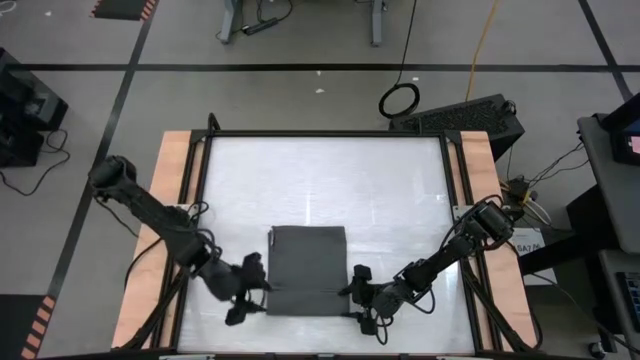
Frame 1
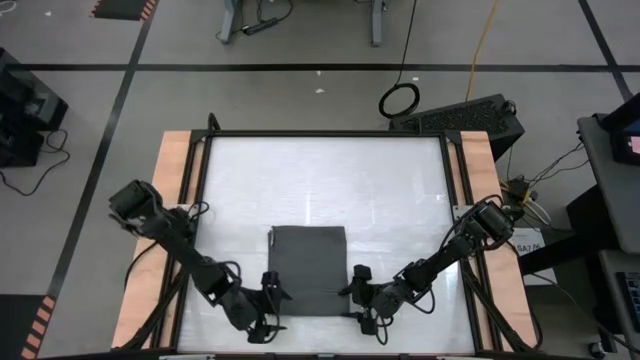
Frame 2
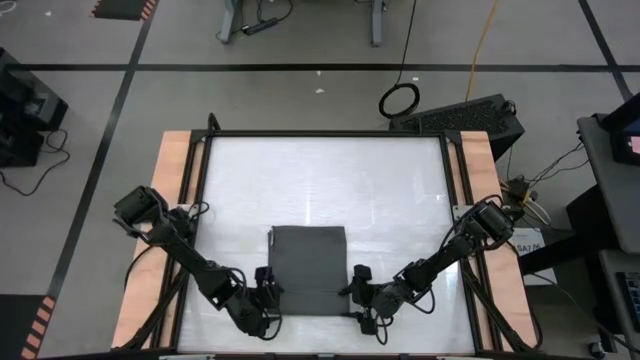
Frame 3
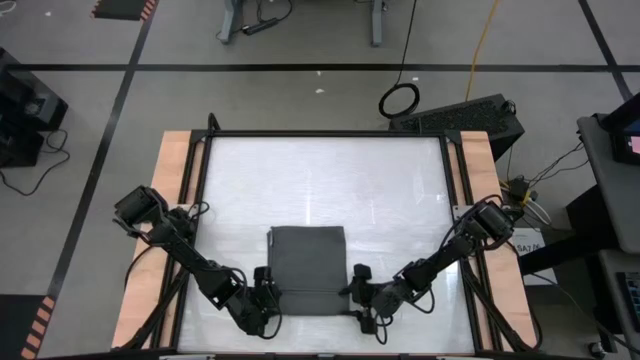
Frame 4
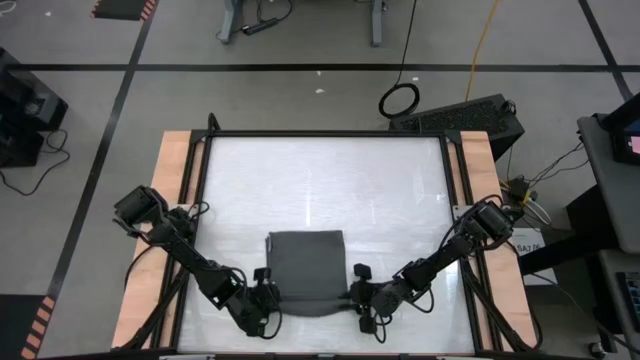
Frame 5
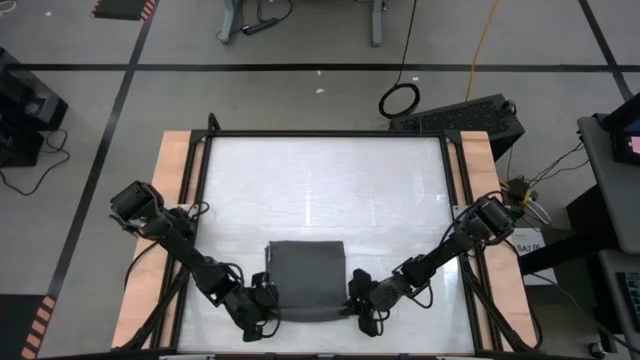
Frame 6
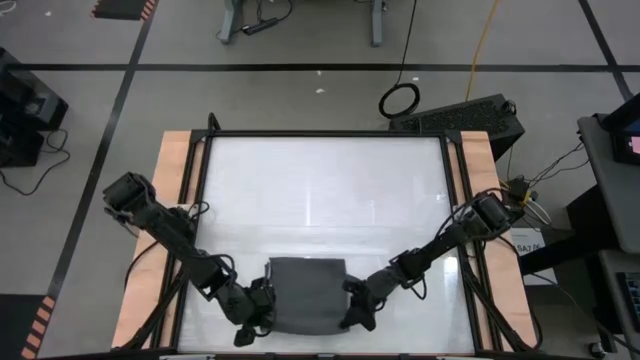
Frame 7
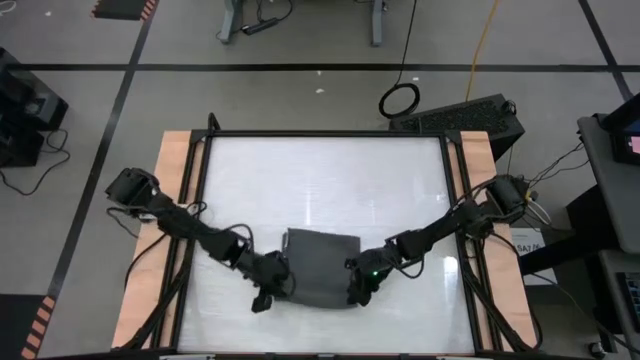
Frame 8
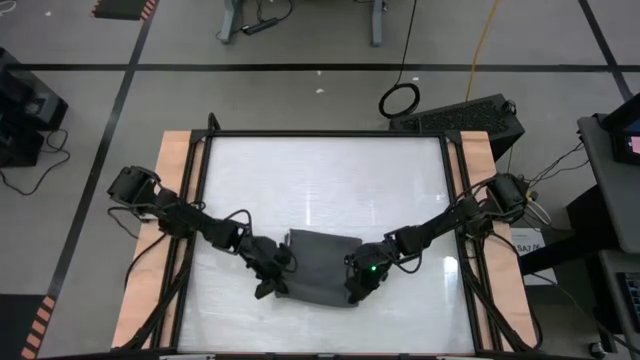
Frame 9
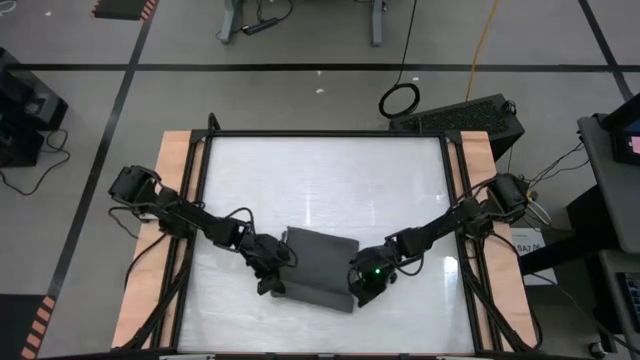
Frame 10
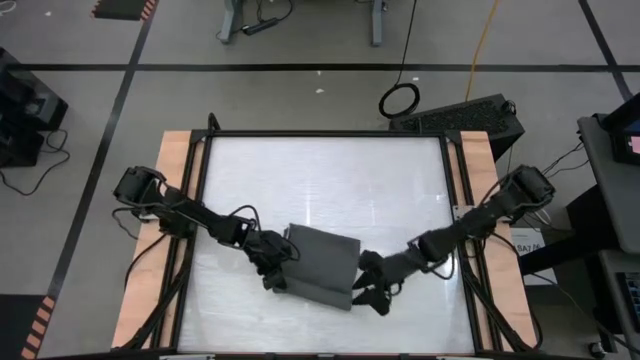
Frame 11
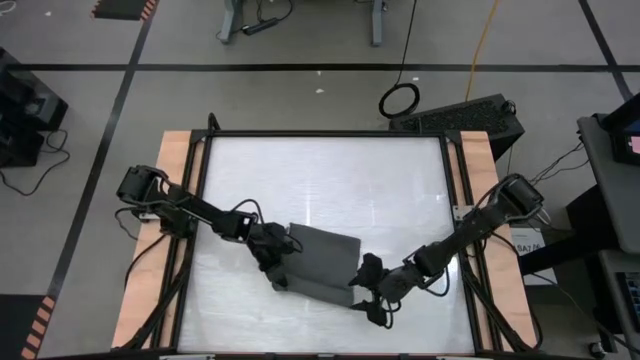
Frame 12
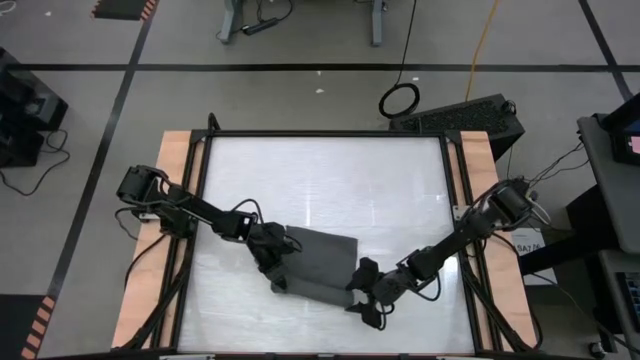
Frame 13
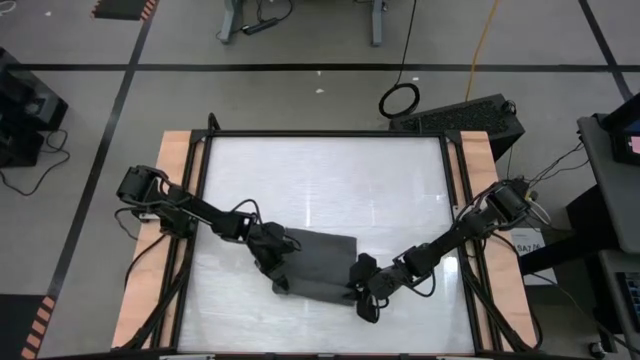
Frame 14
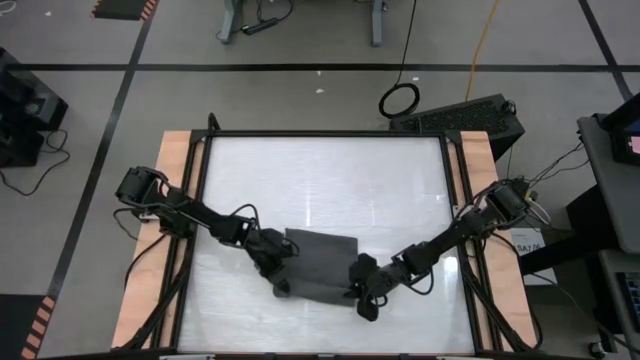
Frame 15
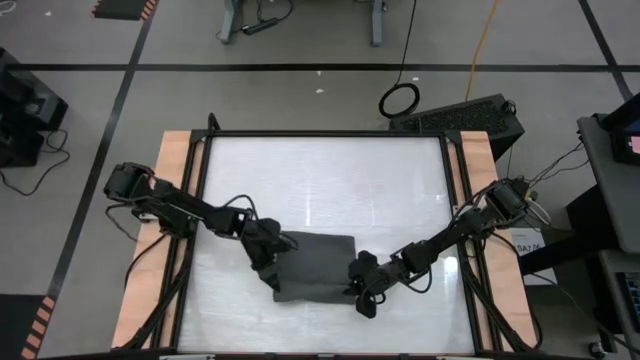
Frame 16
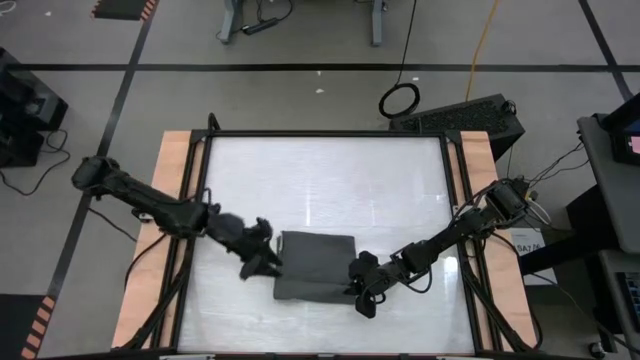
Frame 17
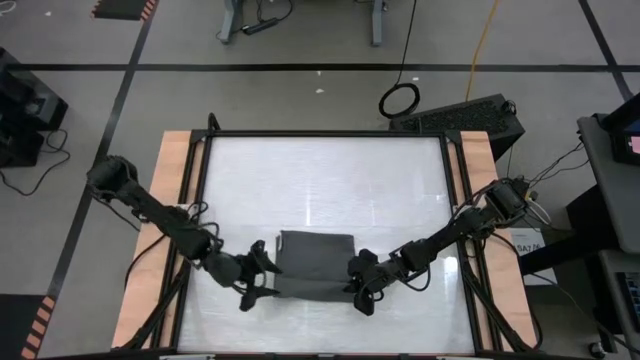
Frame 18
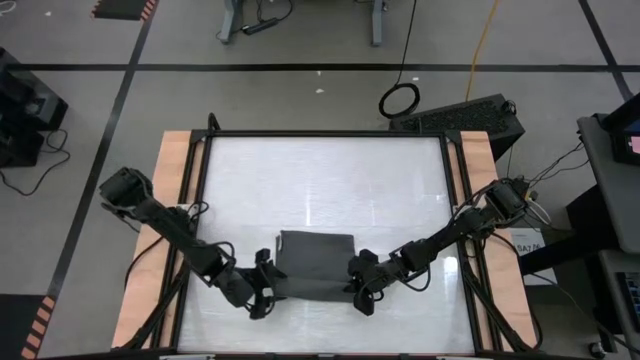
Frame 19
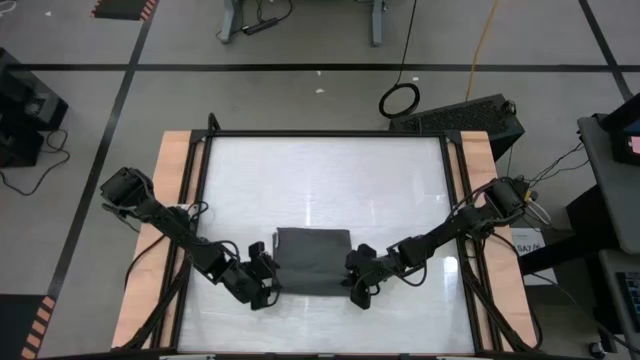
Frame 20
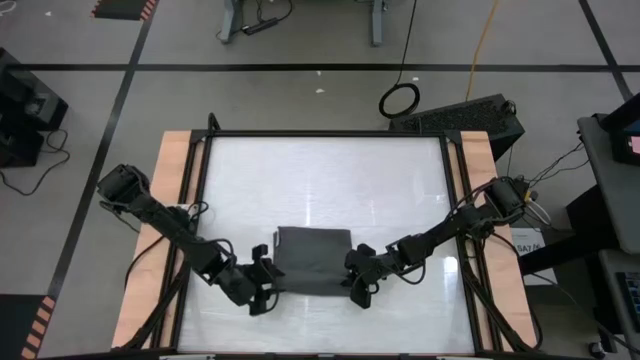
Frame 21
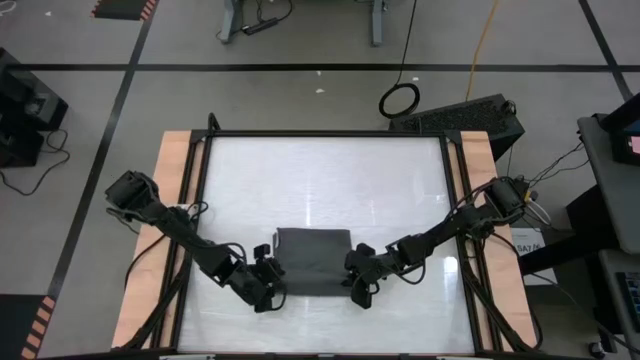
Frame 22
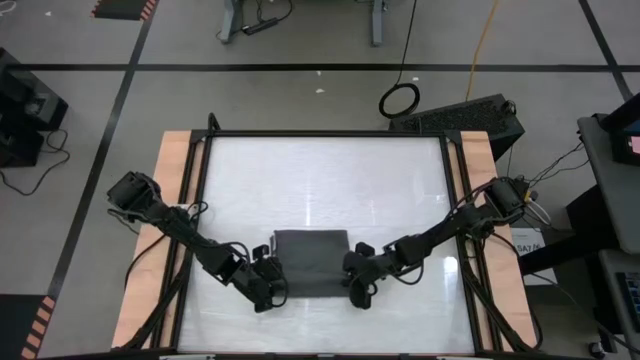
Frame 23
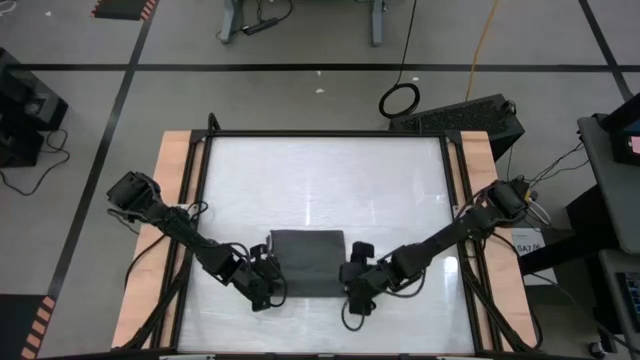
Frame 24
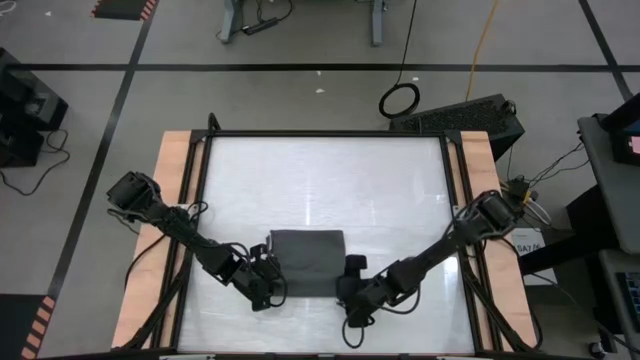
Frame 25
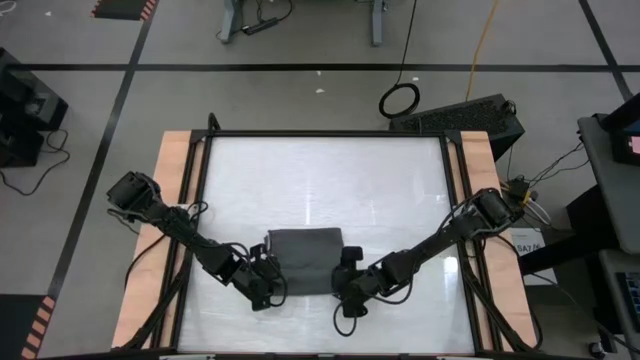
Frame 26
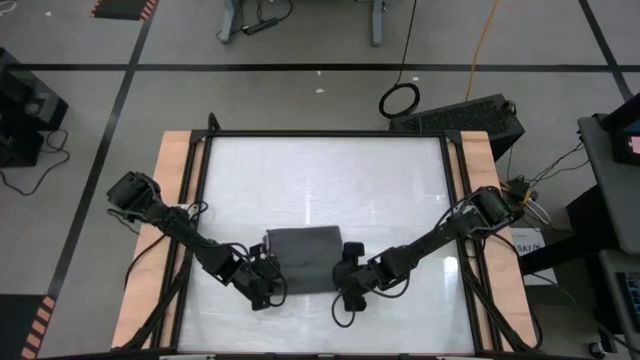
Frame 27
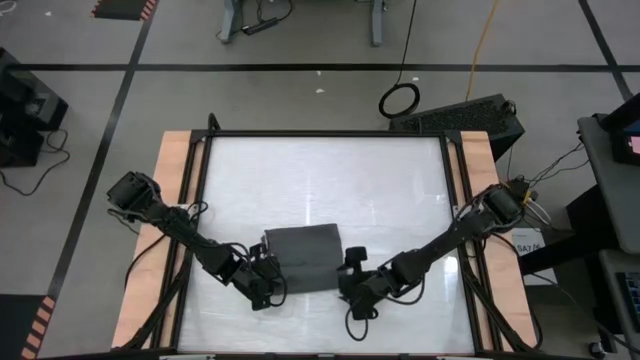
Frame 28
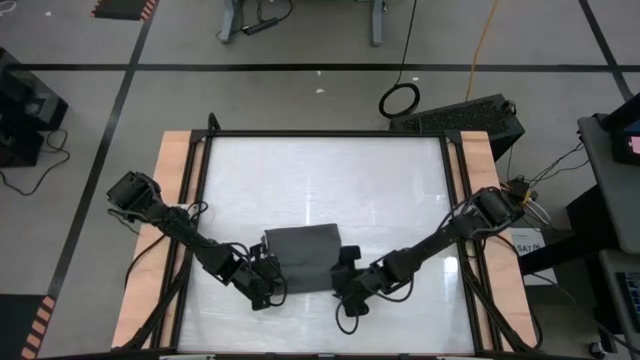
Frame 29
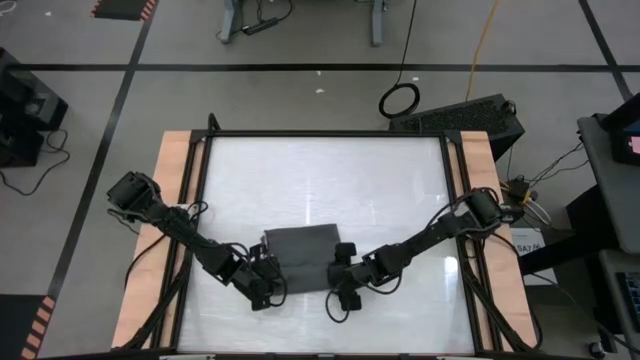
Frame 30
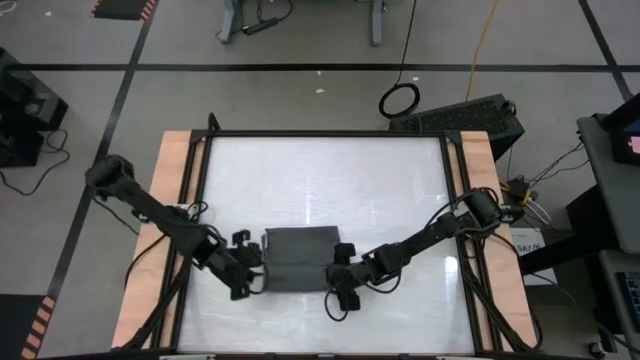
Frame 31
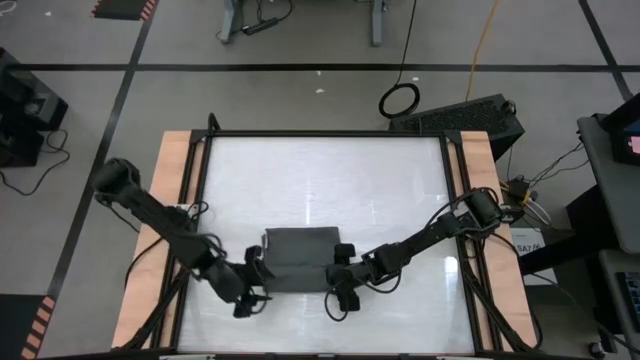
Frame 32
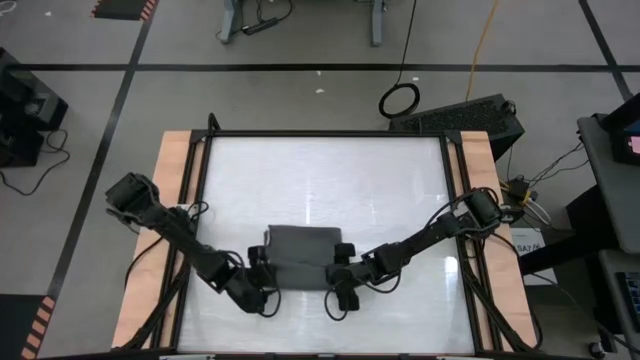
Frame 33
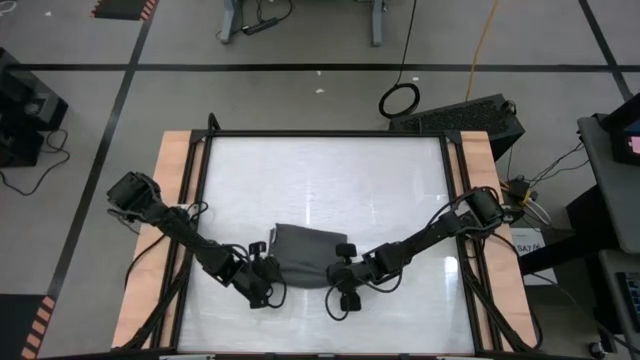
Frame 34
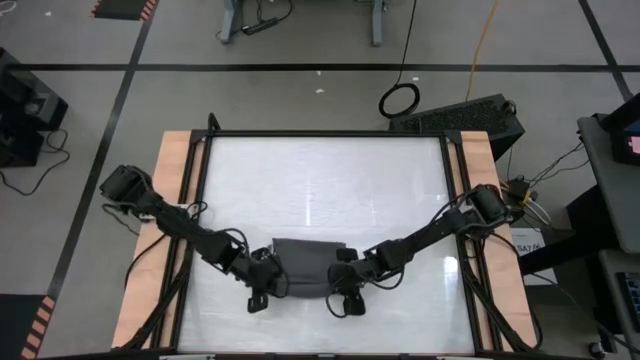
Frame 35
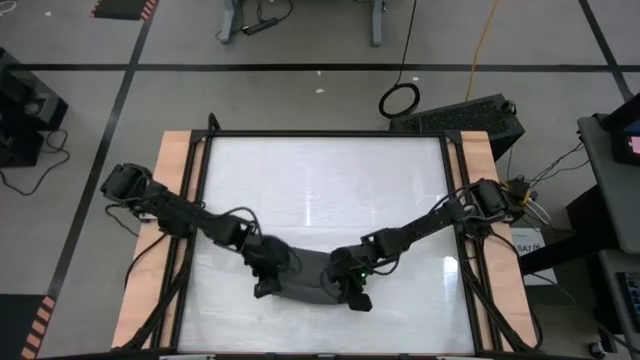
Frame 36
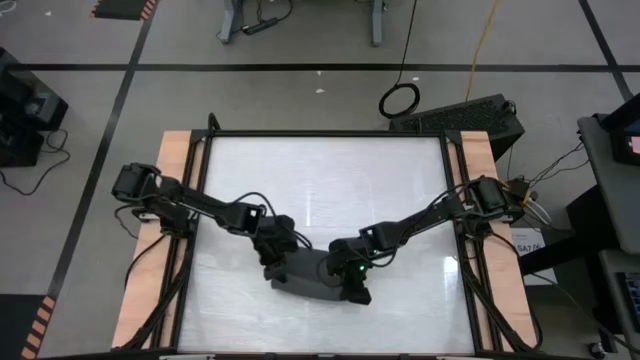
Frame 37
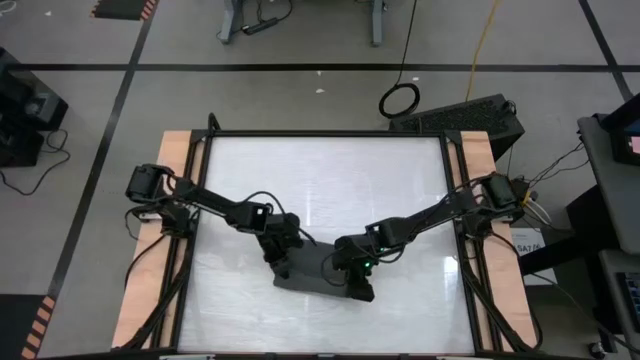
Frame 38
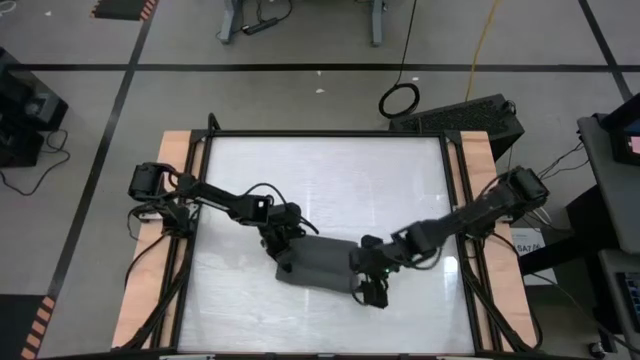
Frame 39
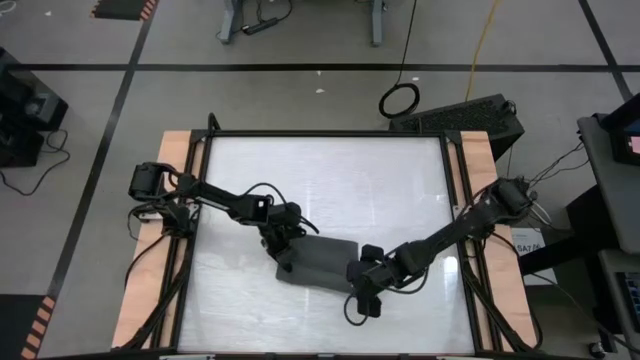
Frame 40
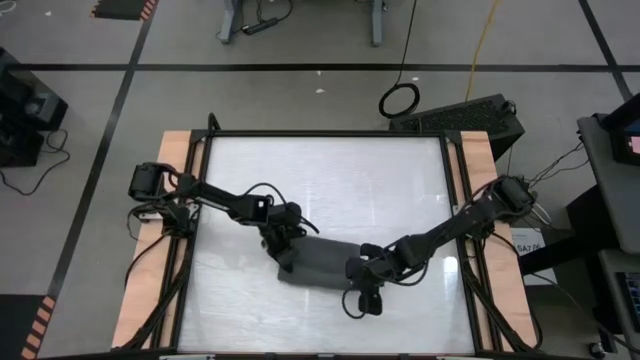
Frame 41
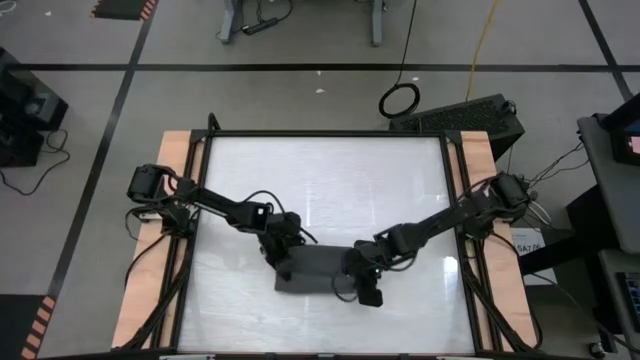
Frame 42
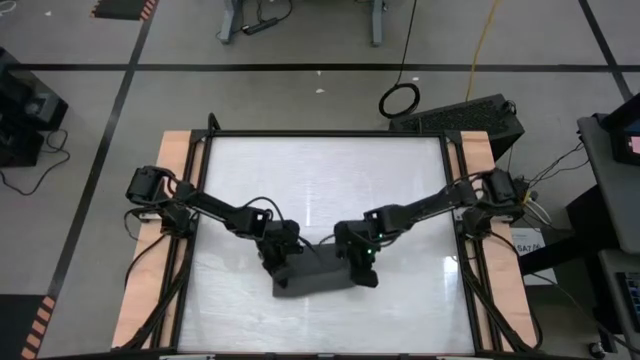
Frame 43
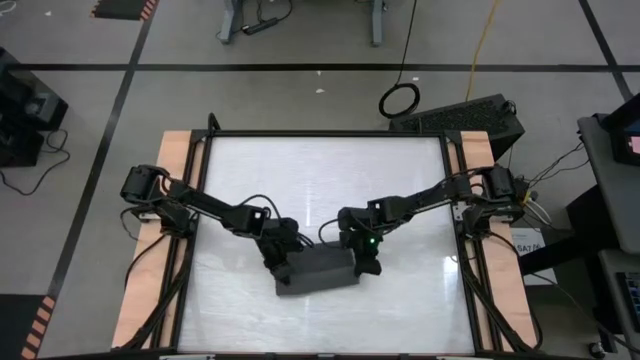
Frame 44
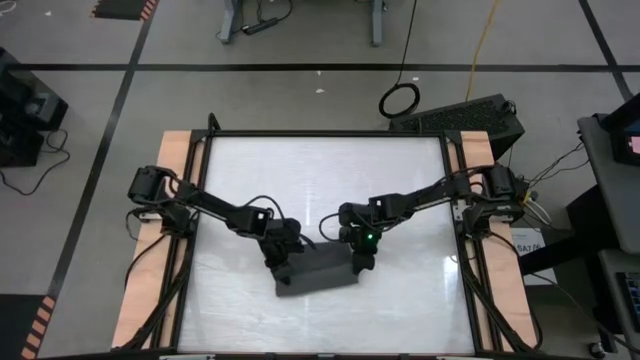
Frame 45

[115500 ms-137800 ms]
Task: Roll towel
Roll the gray towel
